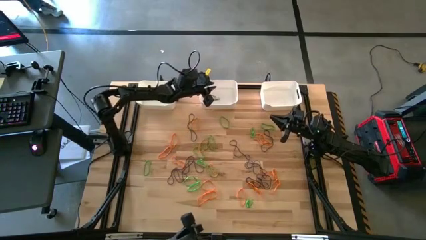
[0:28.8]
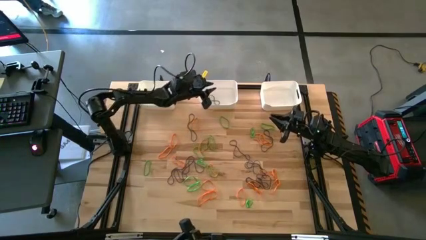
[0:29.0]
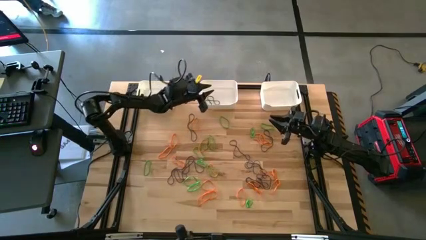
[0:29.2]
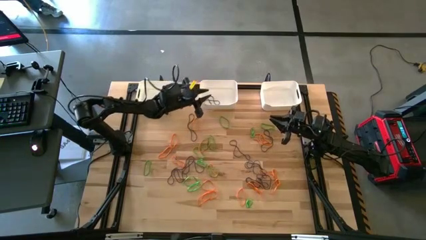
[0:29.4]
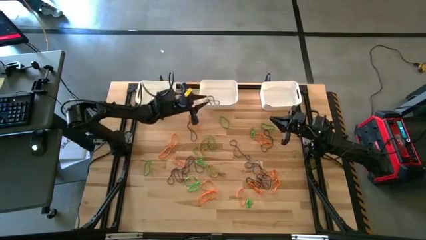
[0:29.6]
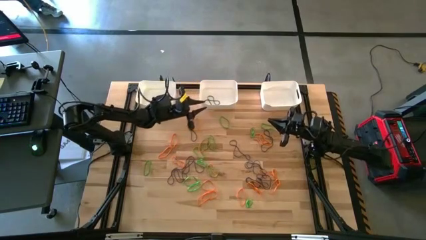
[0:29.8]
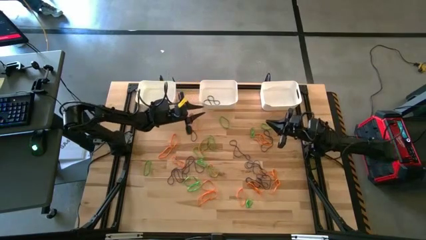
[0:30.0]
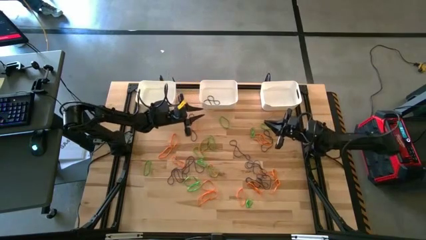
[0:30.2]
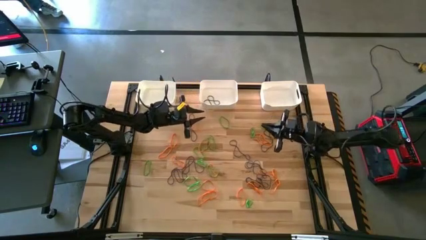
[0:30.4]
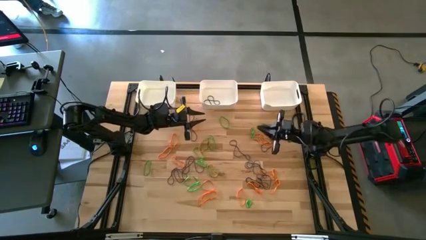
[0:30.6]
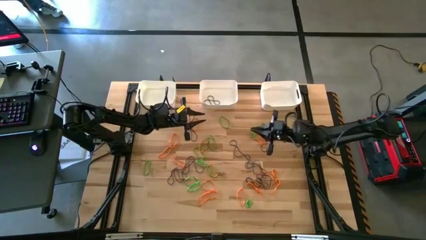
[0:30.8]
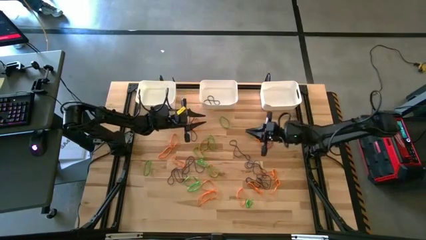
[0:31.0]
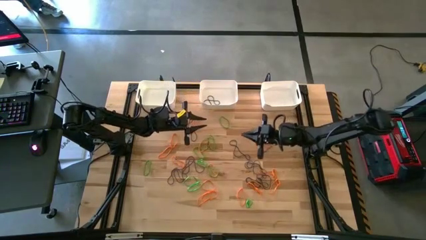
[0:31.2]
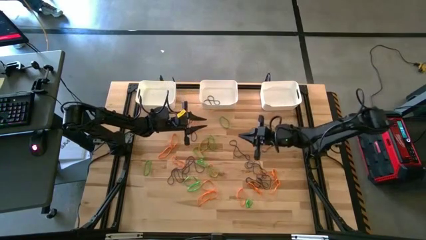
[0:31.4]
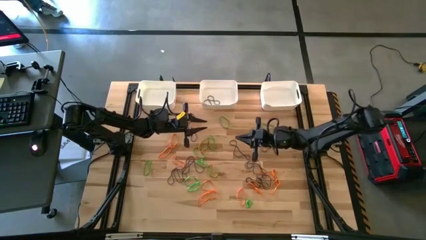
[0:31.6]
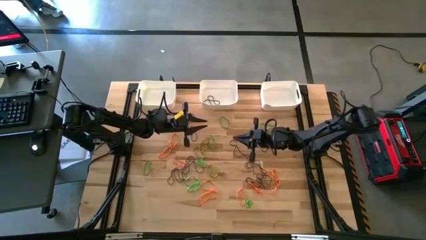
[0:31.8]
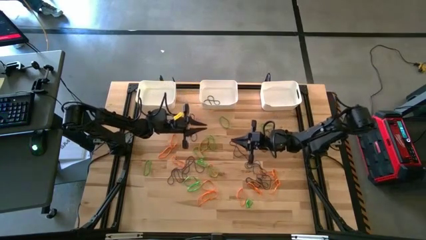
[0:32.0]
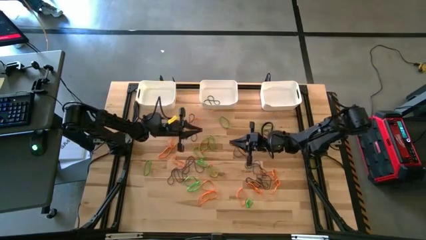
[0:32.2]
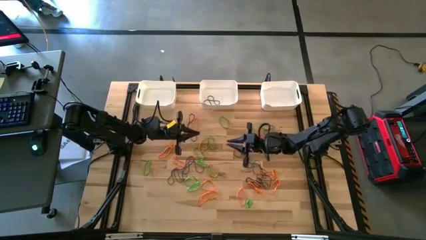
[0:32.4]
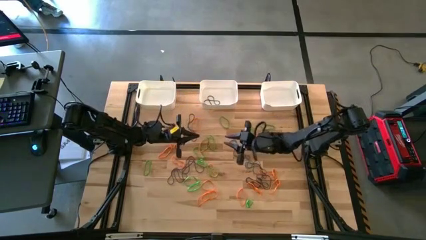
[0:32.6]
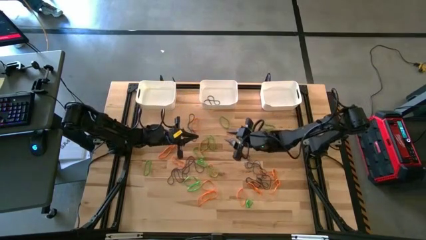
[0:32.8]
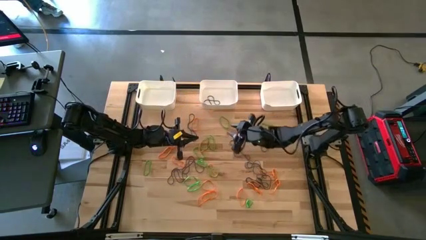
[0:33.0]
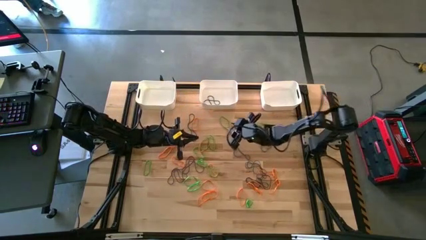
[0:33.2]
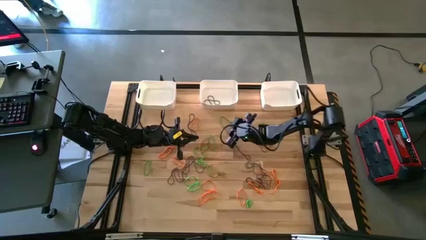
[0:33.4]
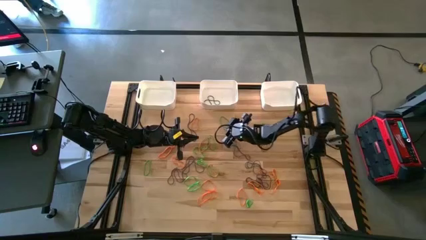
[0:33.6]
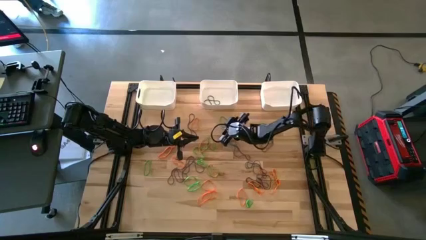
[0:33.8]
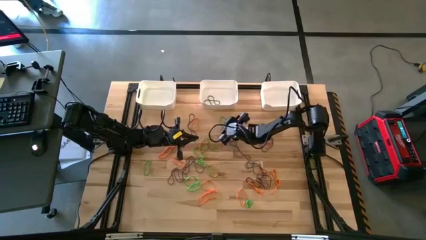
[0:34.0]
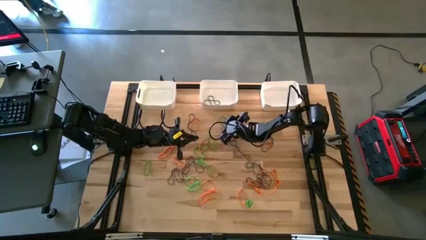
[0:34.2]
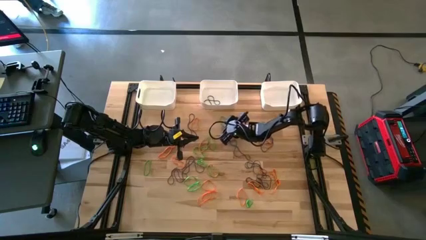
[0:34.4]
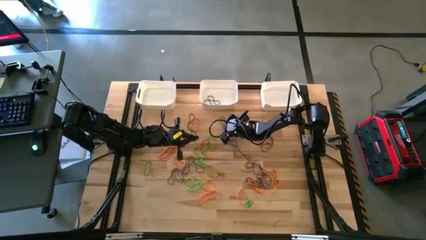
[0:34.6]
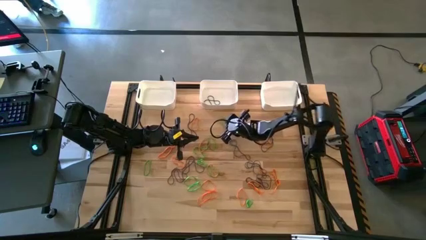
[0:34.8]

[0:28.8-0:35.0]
Task: Sort rubber bands into baskets
Put the green rubber band into the right white bin

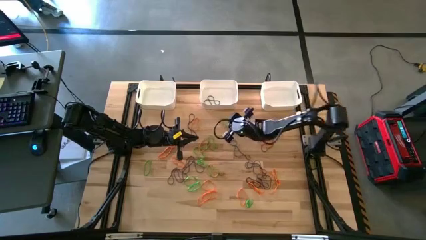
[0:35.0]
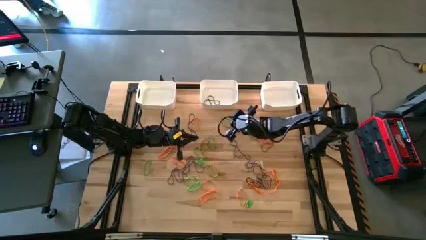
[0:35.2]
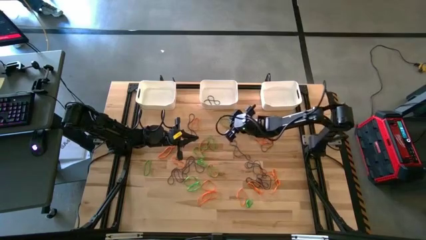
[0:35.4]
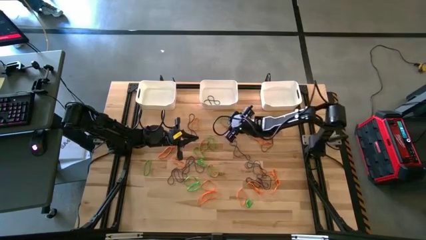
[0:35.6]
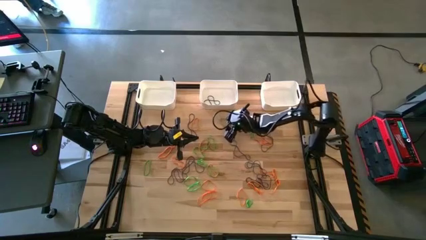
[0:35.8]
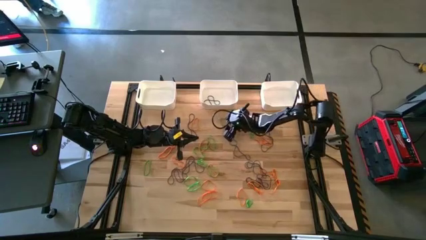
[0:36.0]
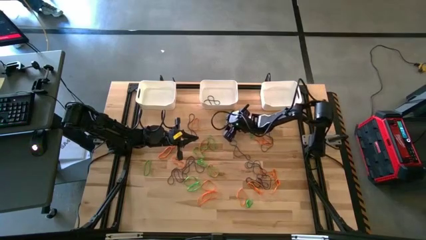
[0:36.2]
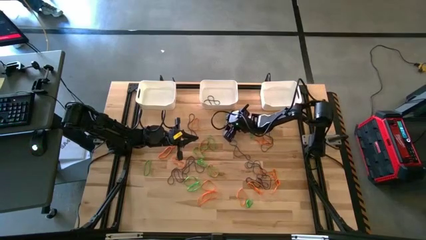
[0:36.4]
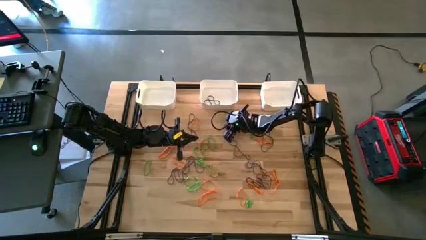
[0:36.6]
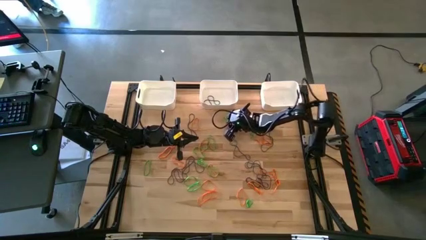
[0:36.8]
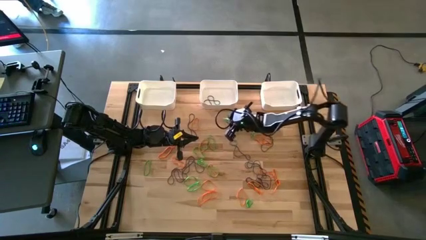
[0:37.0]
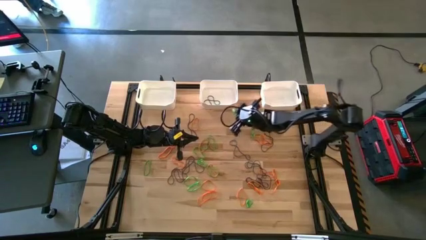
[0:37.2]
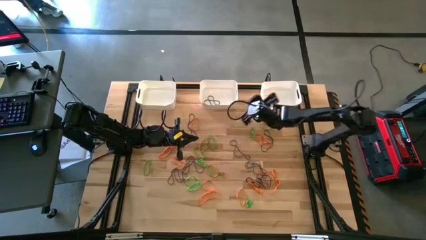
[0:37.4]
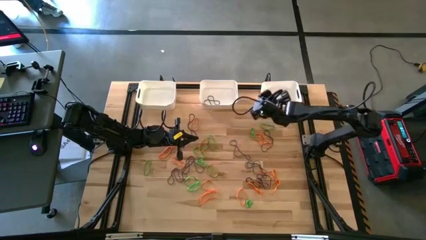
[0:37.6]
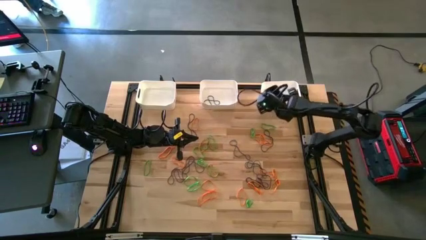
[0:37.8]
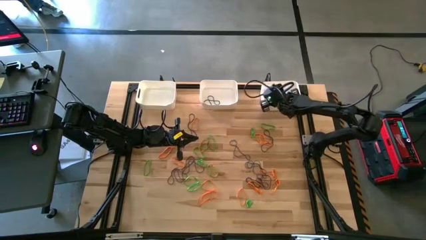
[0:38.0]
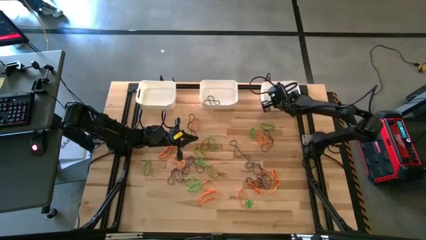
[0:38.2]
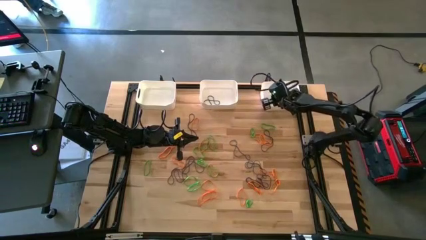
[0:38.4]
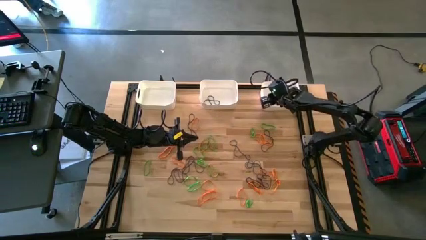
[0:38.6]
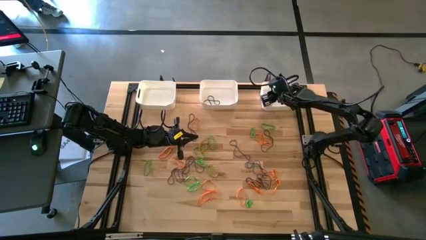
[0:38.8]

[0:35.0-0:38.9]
Put the green rubber band into the right white bin

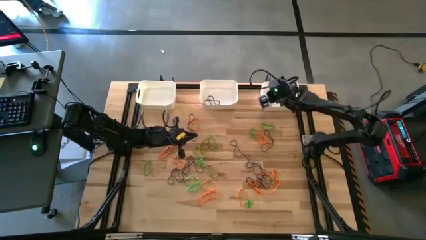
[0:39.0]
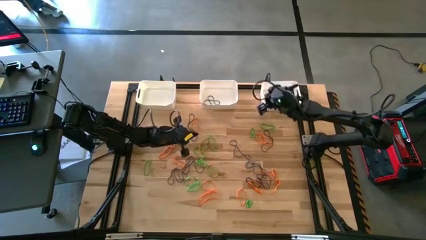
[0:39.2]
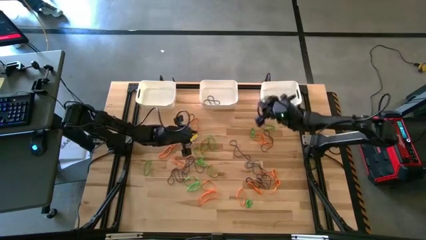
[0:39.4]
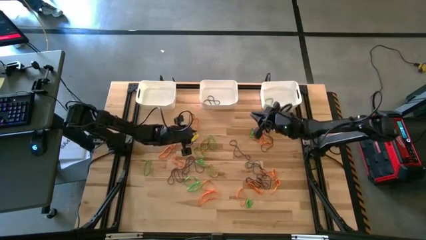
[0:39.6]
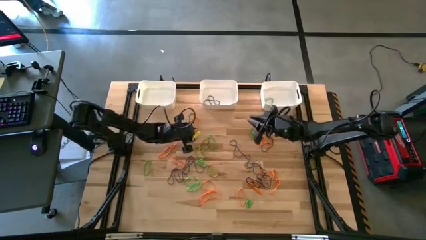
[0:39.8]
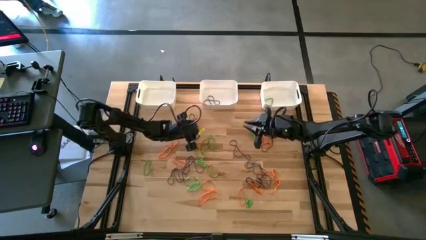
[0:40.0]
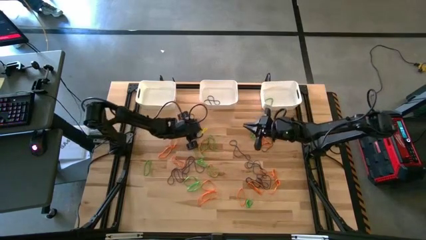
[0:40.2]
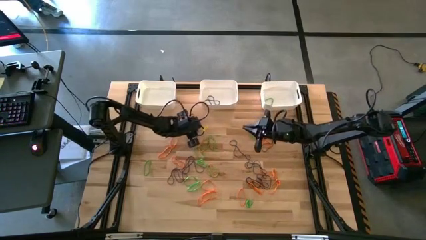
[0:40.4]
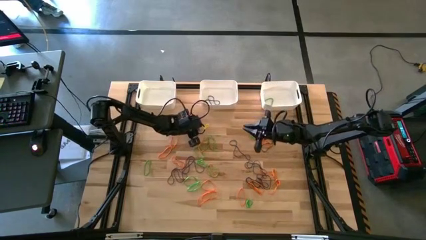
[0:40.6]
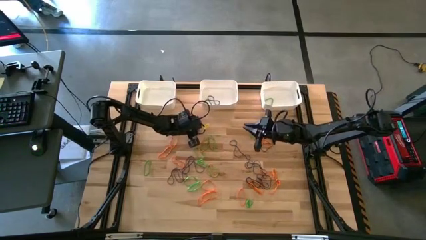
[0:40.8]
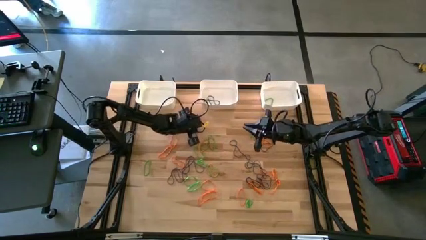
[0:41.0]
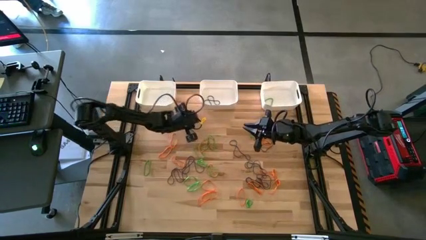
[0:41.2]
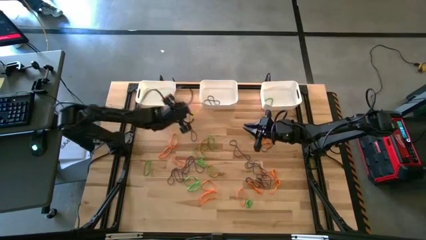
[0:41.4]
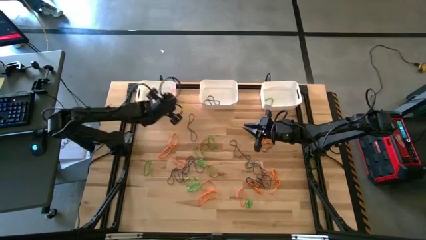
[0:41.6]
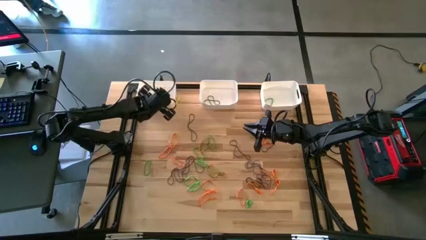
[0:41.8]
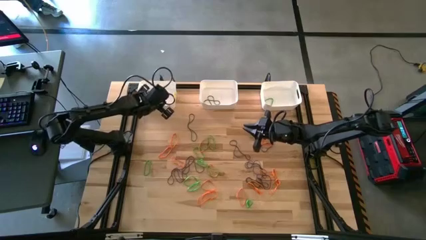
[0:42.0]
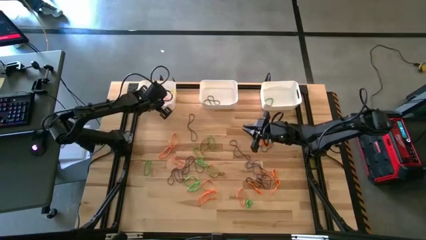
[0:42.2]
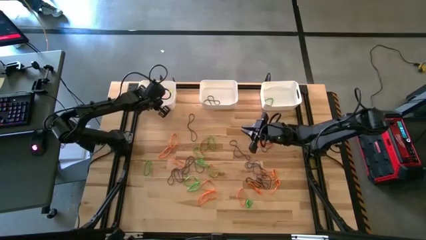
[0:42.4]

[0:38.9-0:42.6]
Put the orange rubber band into the left white bin

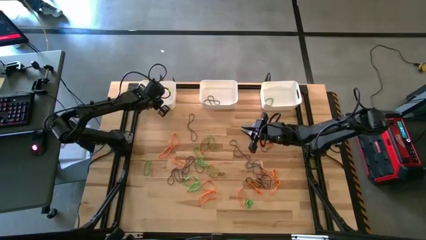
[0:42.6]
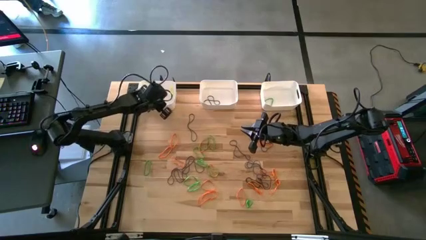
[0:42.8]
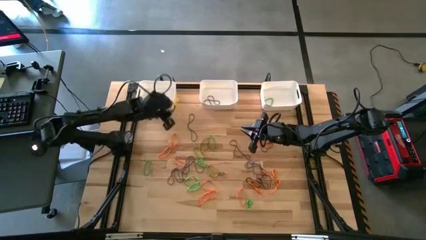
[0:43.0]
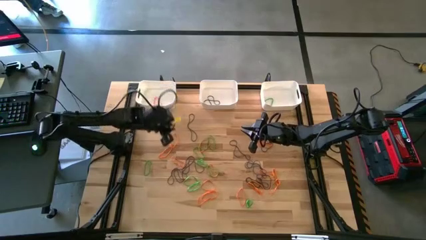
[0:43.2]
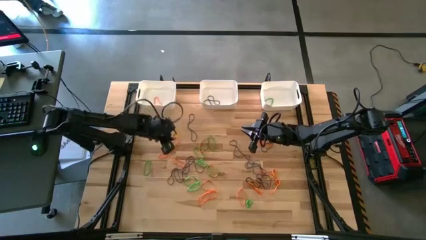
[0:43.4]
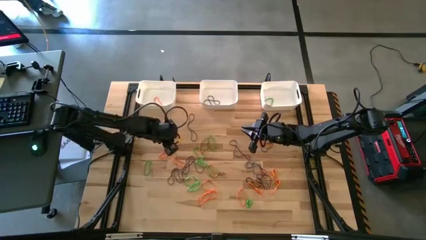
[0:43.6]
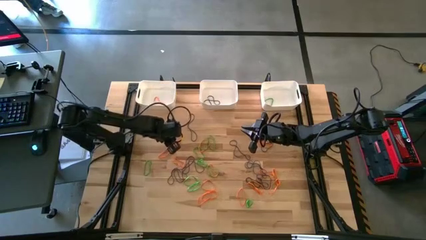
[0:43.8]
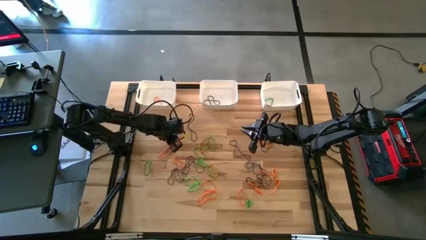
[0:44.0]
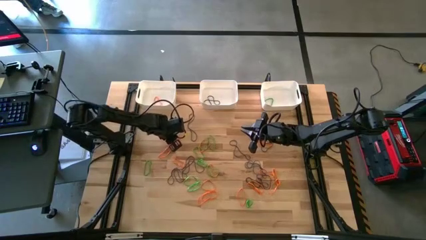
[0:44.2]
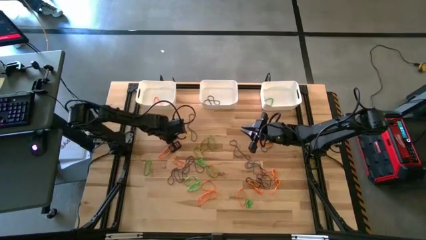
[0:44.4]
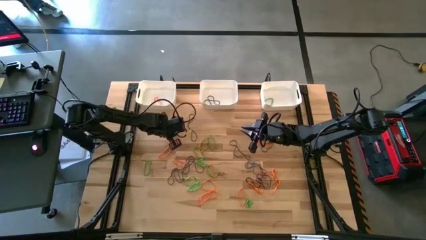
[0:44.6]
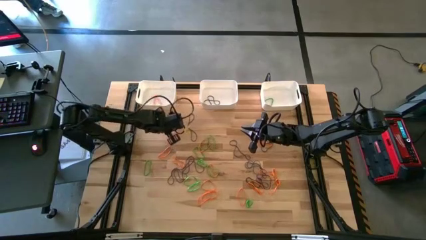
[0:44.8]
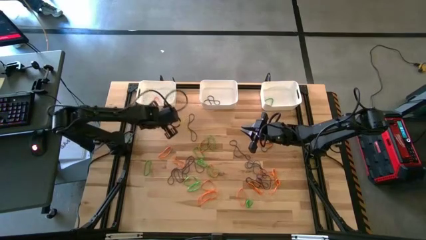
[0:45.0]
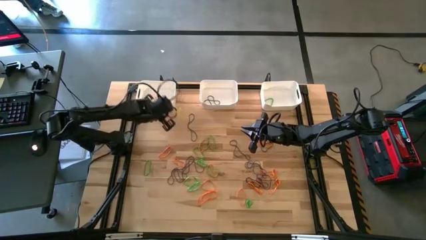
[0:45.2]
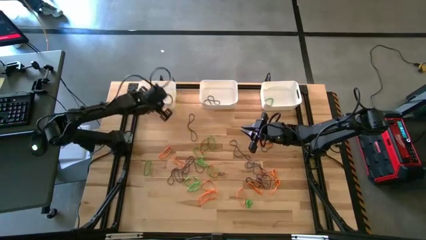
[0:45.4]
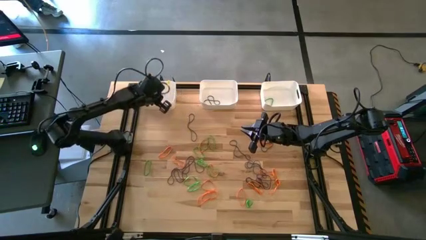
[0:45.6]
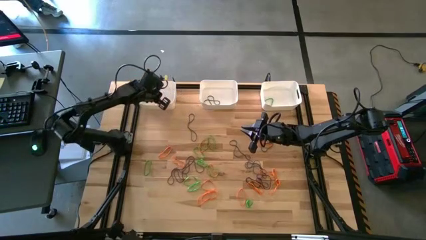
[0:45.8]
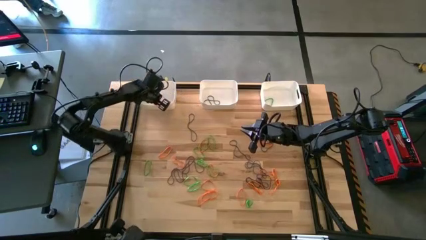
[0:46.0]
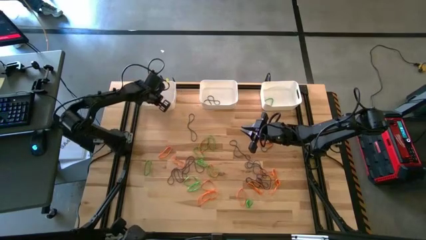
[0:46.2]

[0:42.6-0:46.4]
Put the orange rubber band into the left white bin
